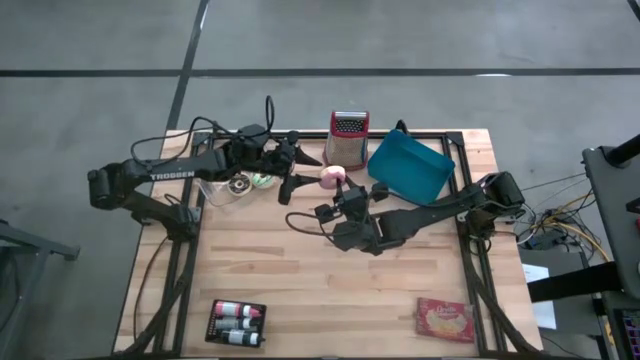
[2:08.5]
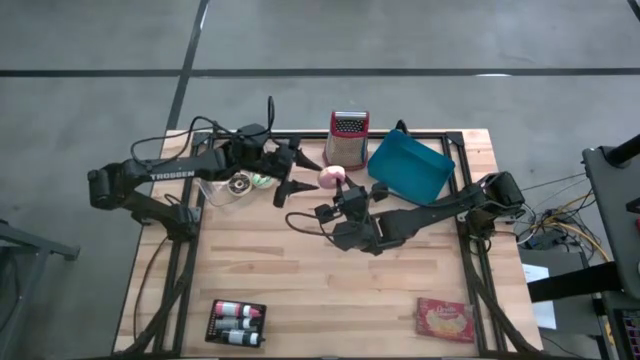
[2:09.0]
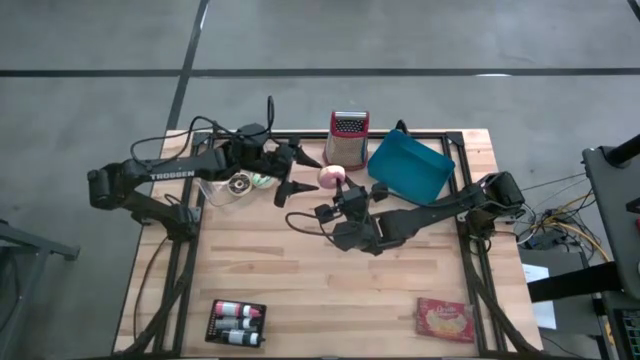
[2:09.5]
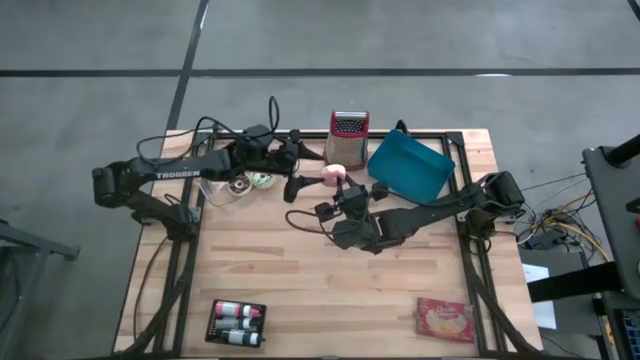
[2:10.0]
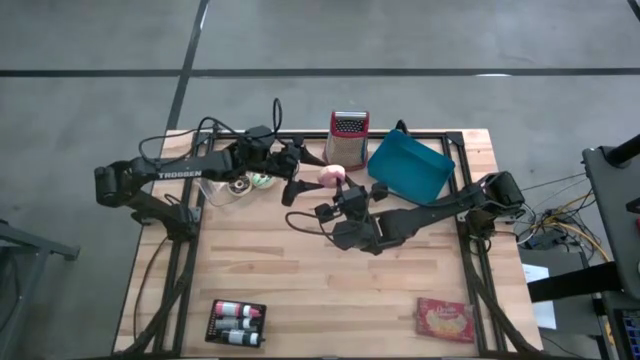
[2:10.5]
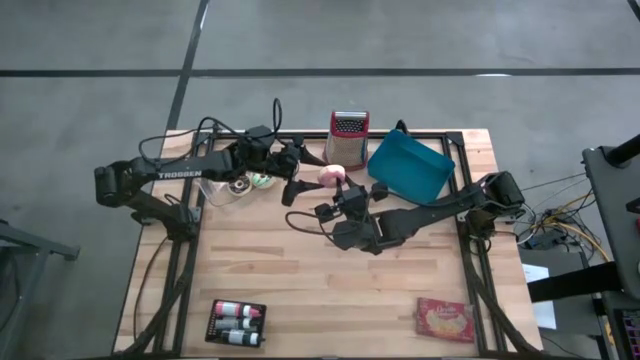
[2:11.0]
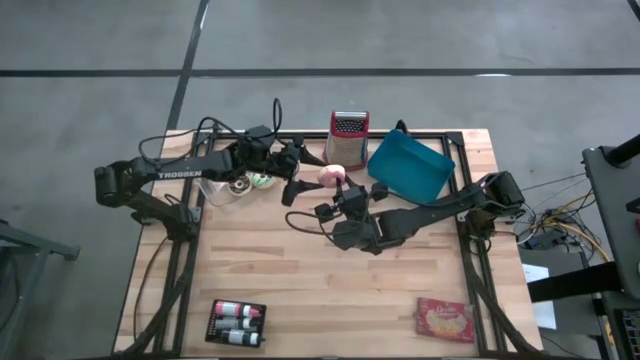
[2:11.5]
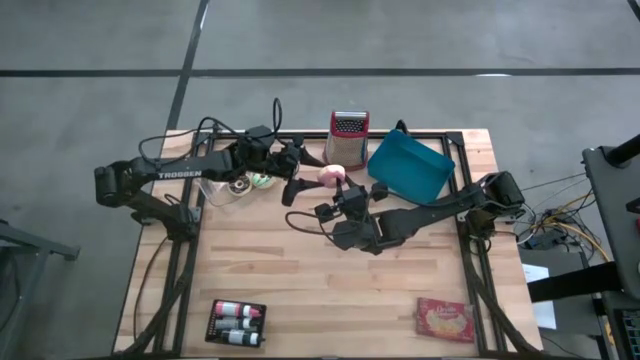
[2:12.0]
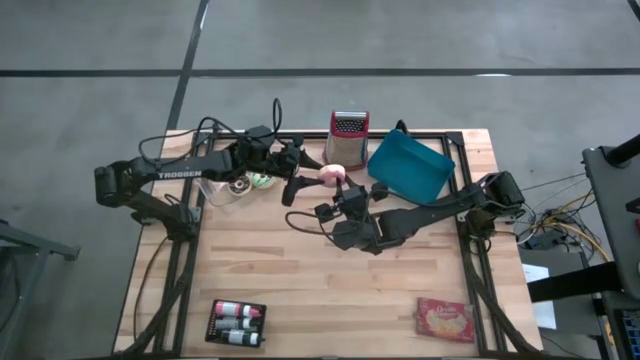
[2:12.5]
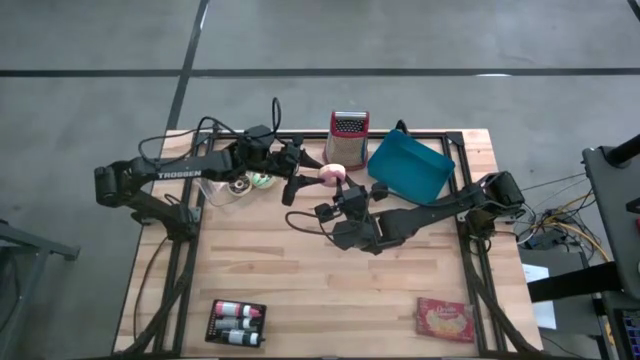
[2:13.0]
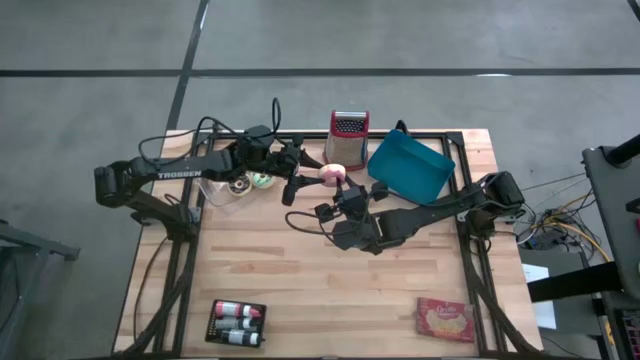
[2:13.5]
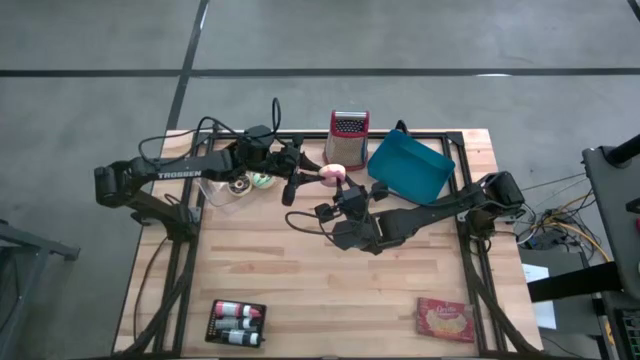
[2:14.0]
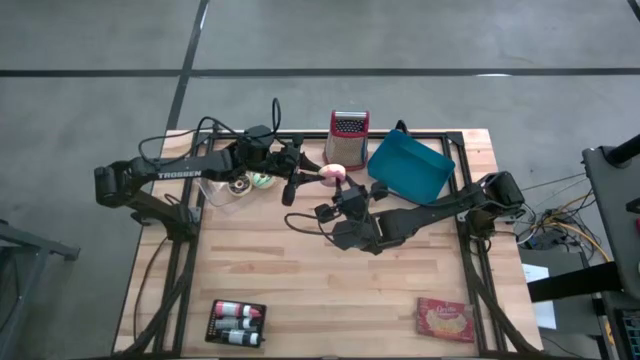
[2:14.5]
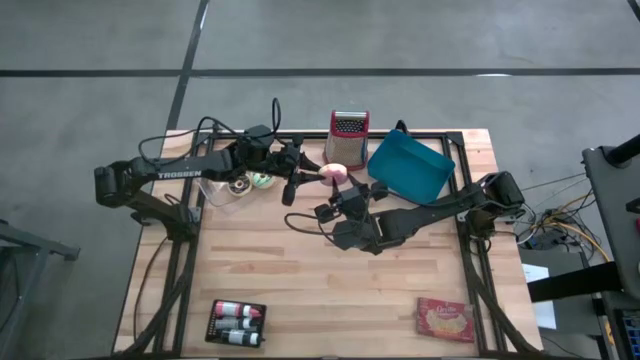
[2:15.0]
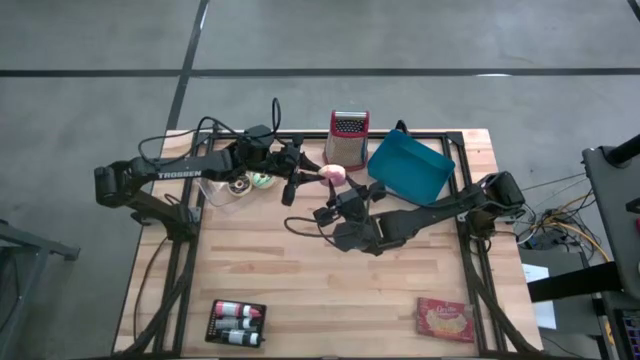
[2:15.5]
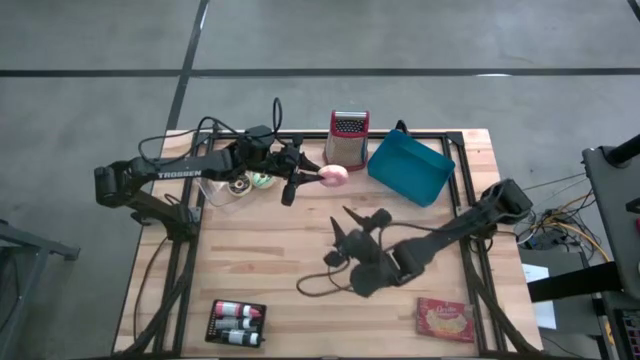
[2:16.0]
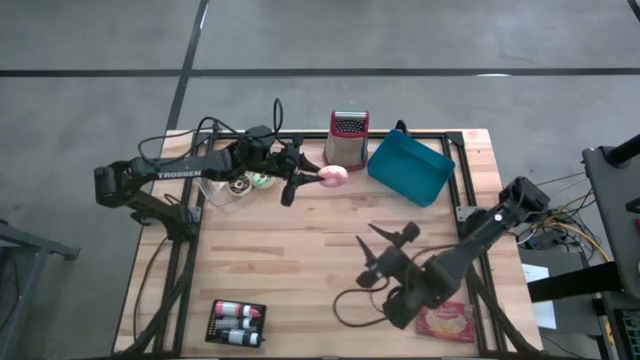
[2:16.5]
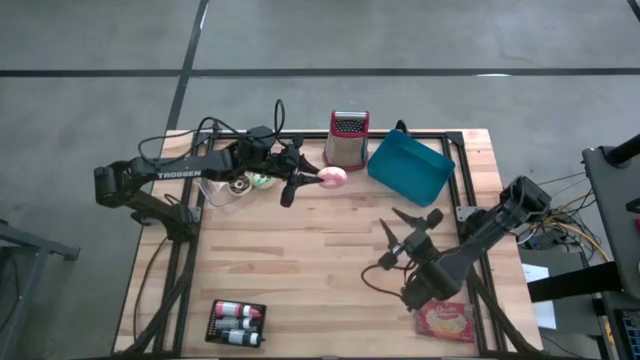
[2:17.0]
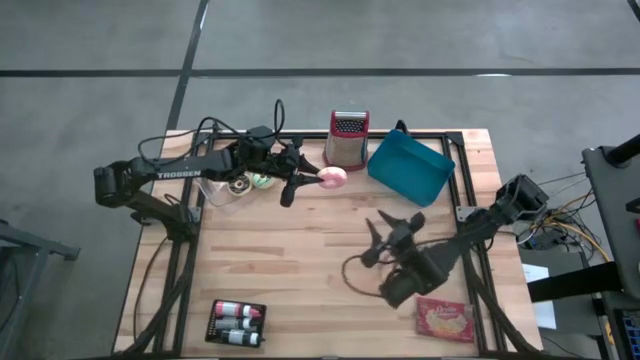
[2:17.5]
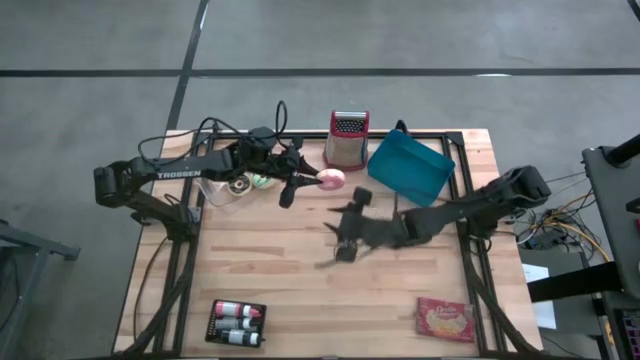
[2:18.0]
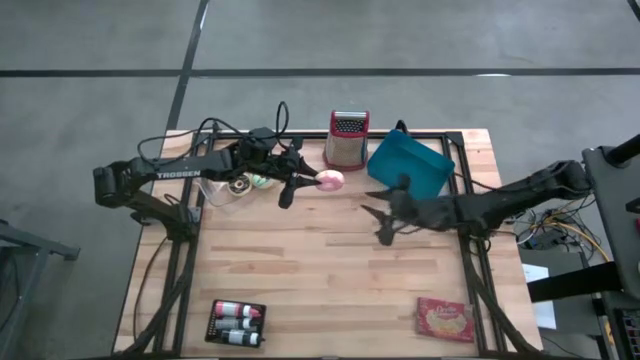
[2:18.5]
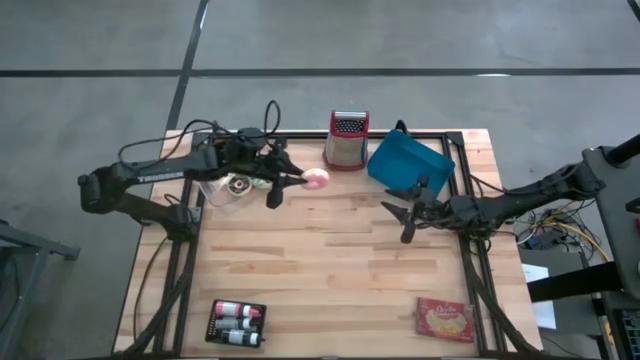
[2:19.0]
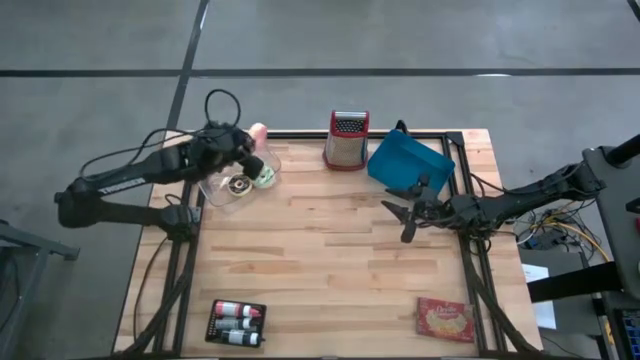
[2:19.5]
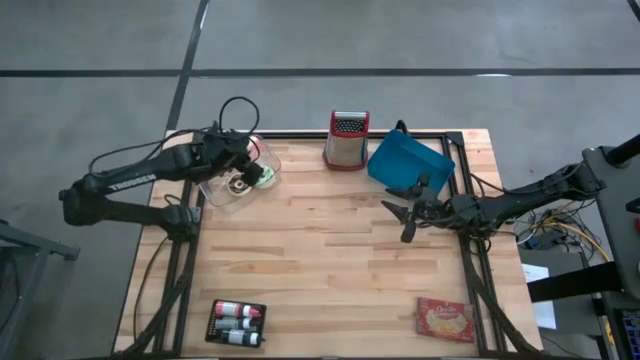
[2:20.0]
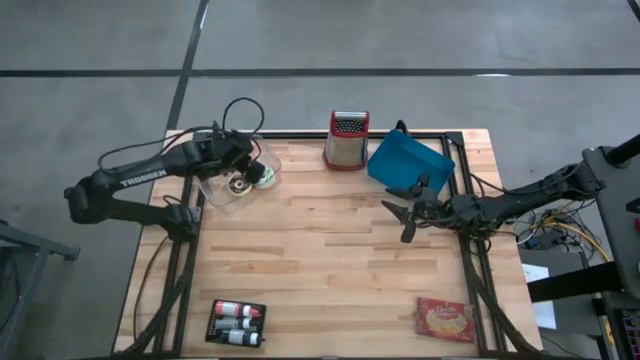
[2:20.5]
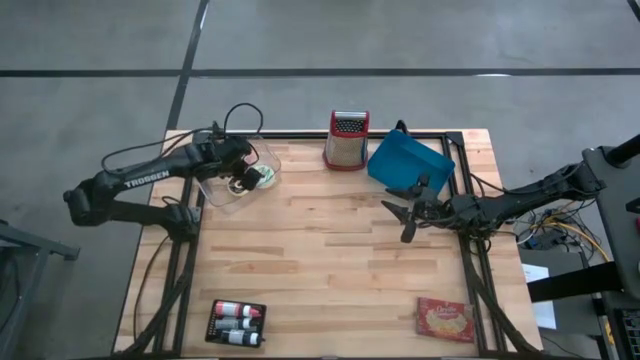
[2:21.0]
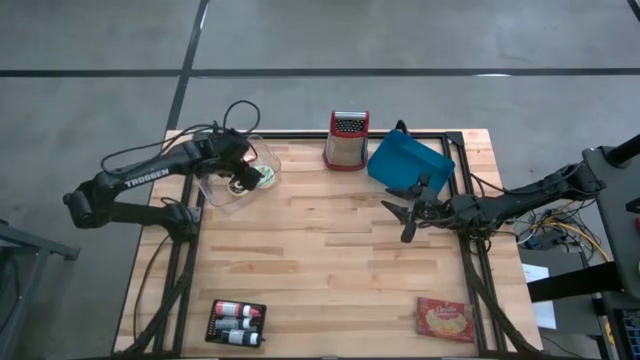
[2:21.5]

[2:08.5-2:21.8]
Task: Pick & Place Food Item
Put the pink donut into the transparent bin

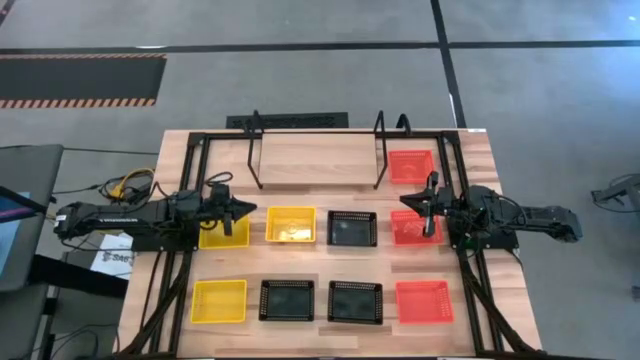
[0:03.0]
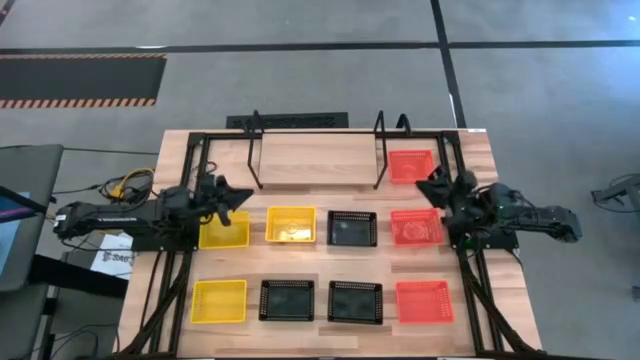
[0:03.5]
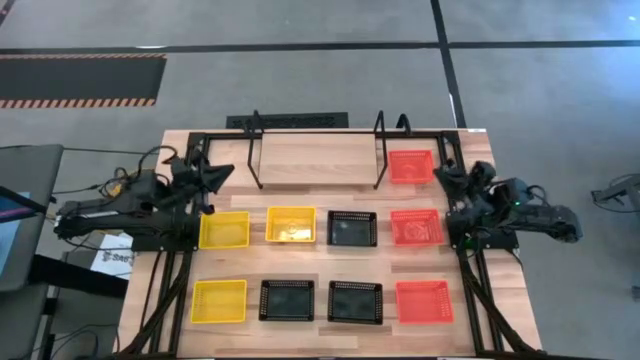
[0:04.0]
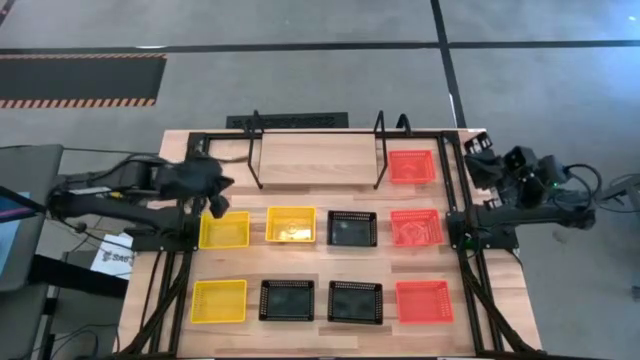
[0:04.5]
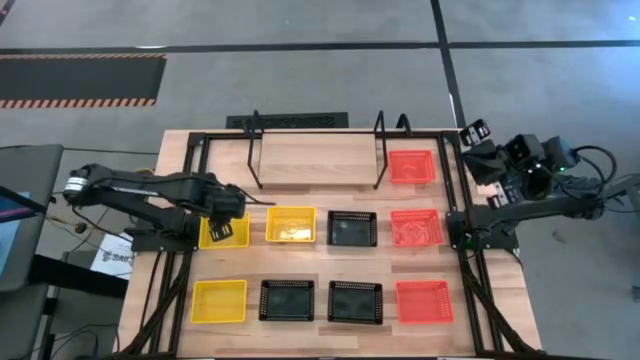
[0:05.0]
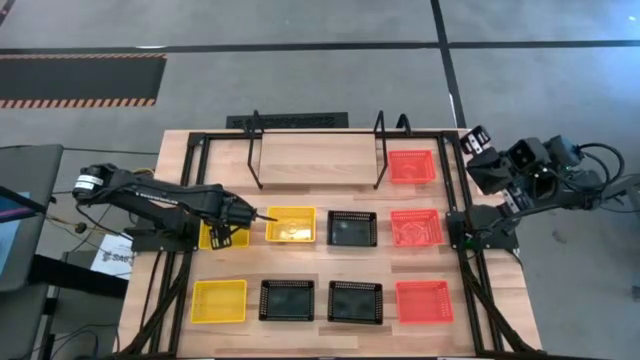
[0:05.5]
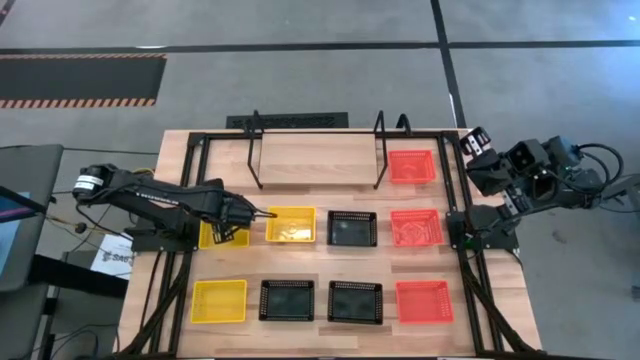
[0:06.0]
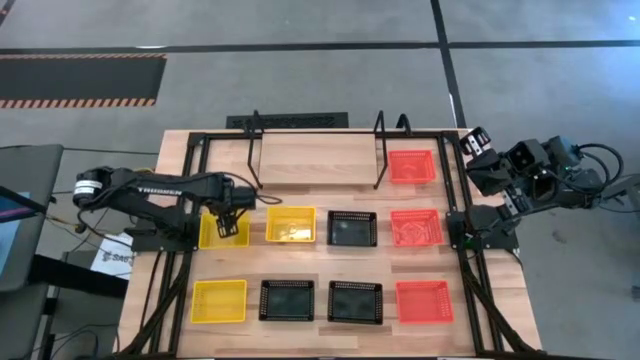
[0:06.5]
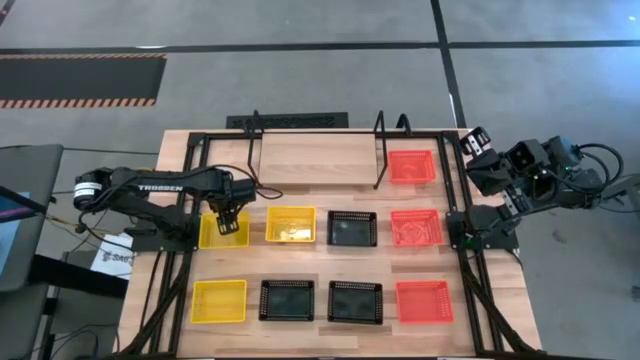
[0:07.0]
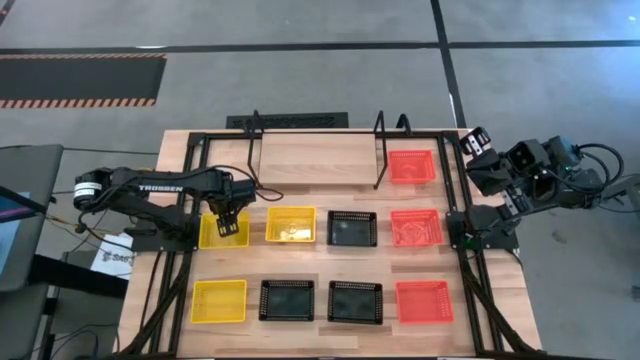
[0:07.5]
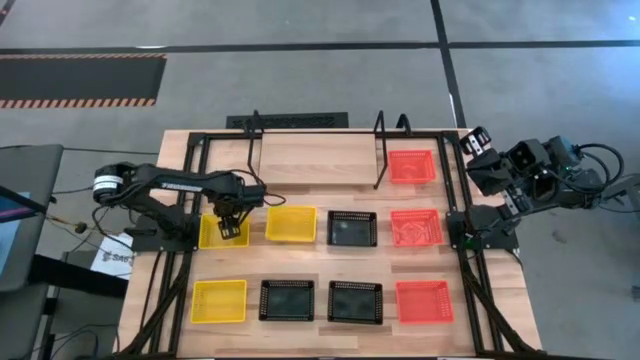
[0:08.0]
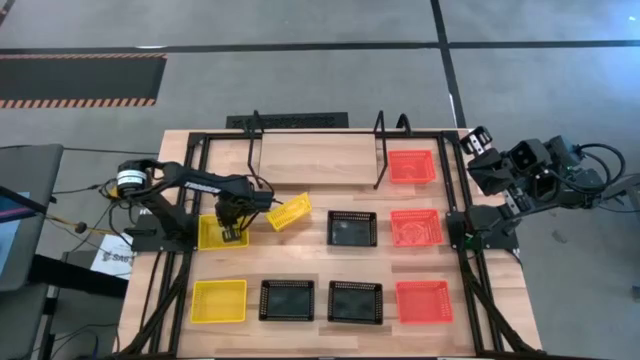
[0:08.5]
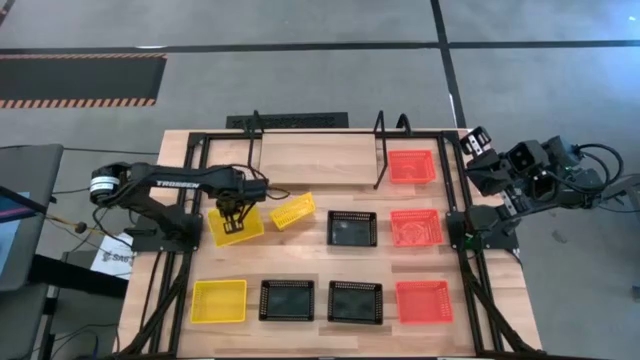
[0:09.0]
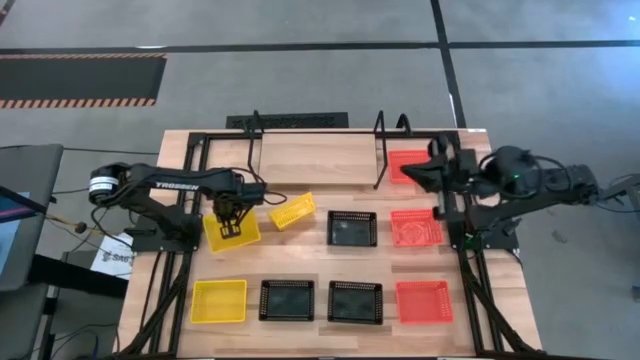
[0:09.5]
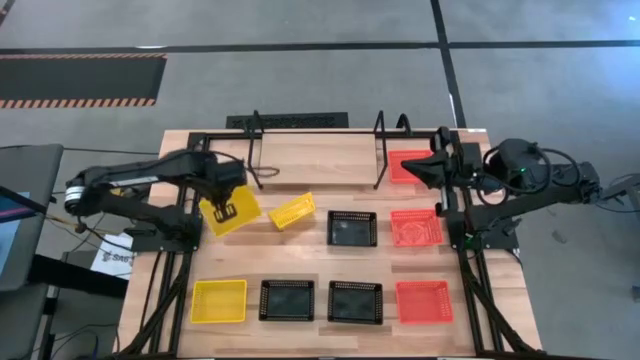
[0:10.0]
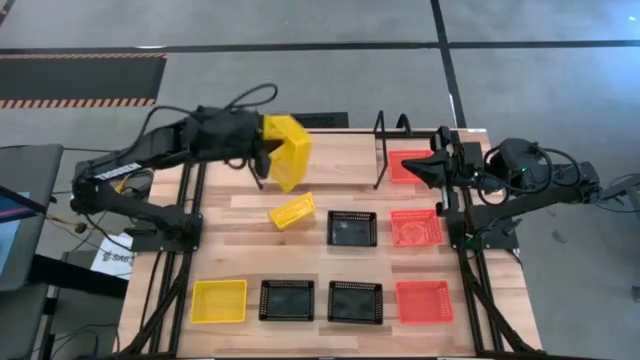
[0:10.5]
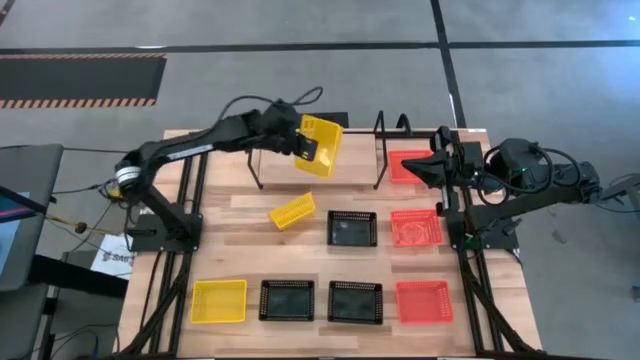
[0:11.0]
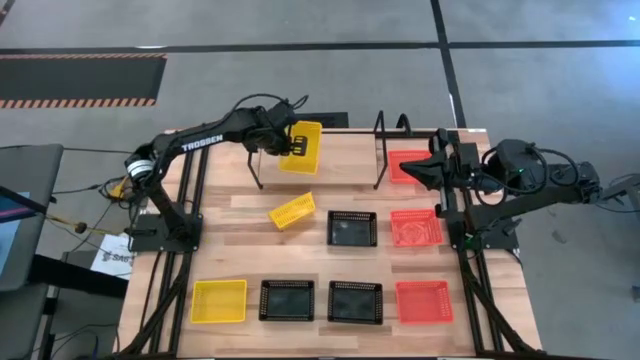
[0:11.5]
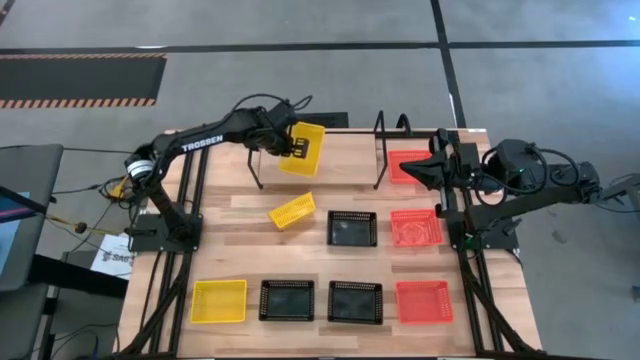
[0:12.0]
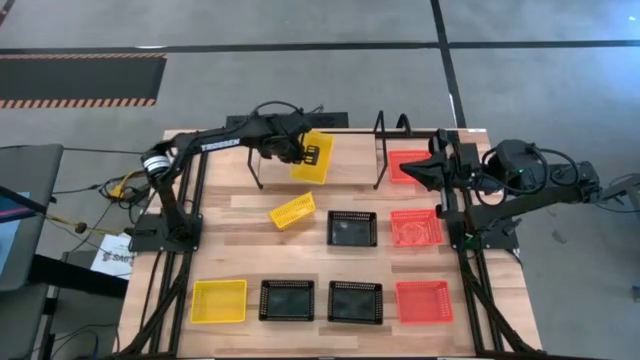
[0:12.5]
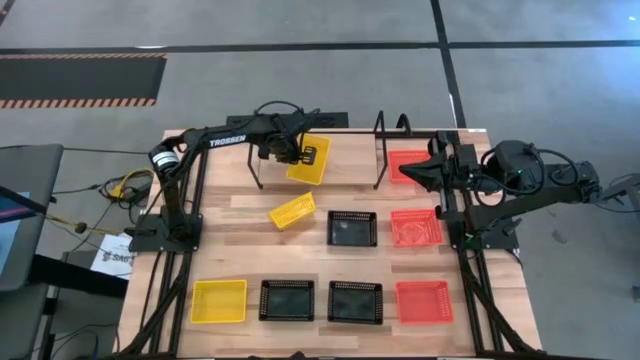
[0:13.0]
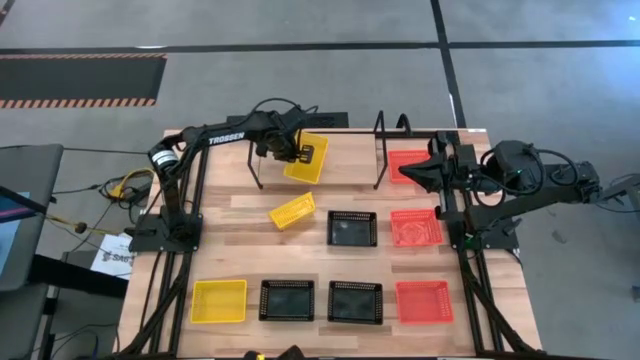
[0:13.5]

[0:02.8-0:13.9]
Task: Stack baskets on shelf by color
Put the top left yellow bin on the shelf
